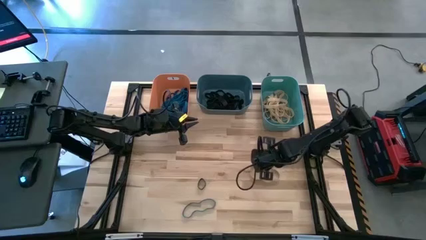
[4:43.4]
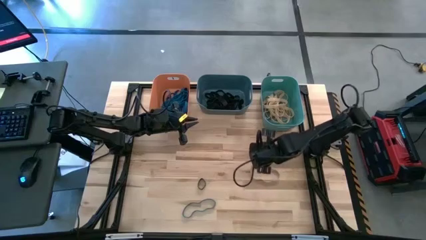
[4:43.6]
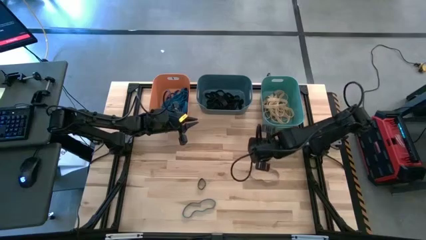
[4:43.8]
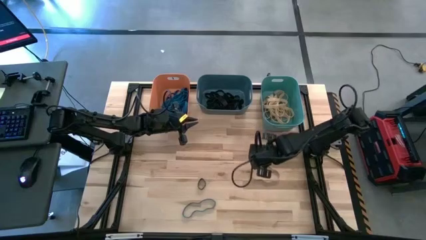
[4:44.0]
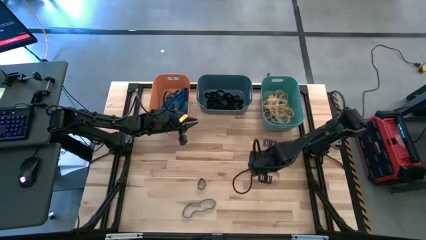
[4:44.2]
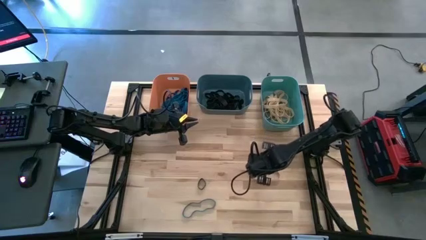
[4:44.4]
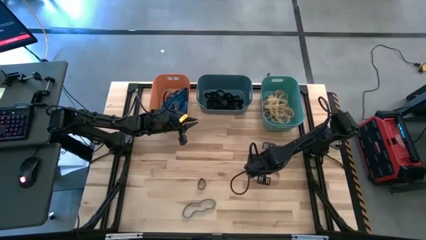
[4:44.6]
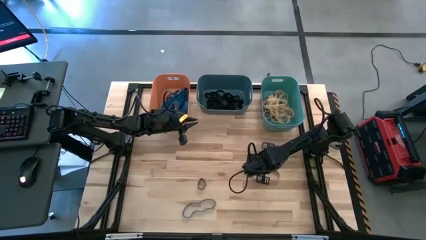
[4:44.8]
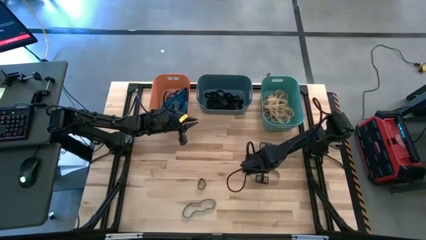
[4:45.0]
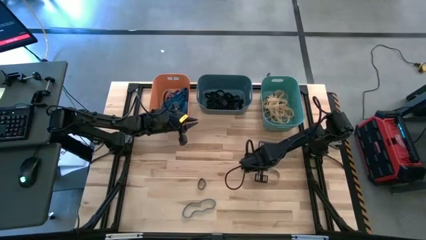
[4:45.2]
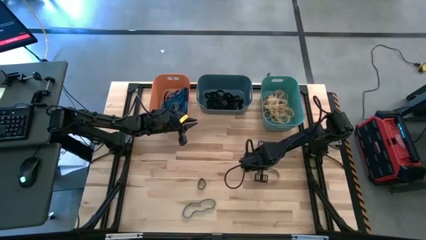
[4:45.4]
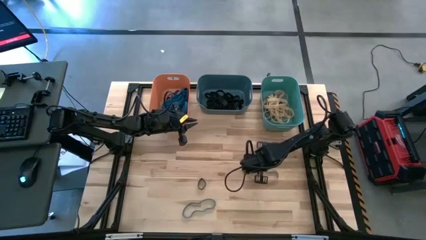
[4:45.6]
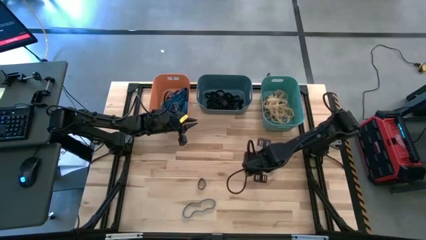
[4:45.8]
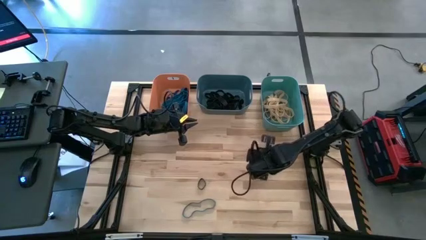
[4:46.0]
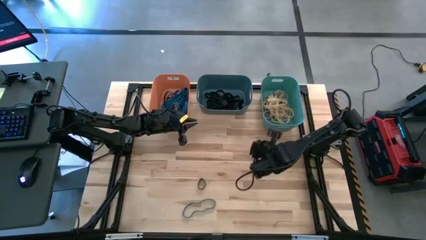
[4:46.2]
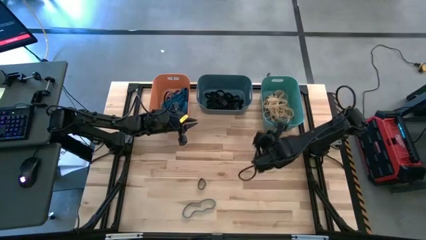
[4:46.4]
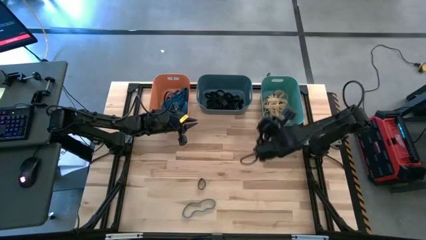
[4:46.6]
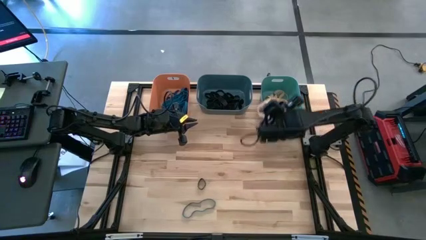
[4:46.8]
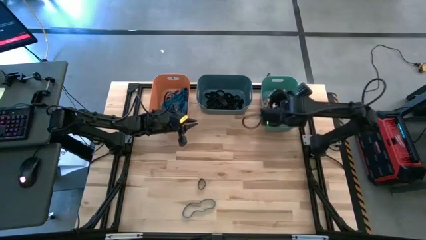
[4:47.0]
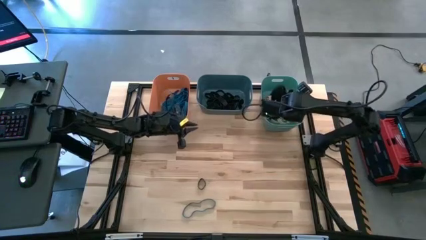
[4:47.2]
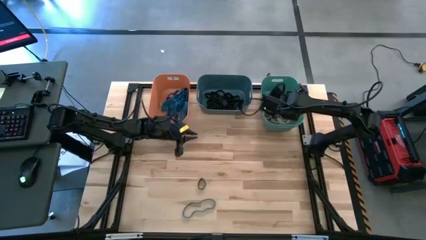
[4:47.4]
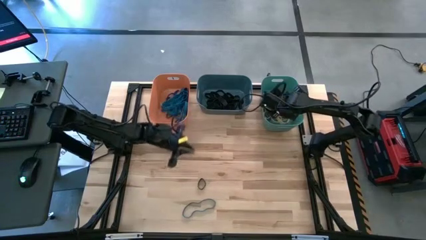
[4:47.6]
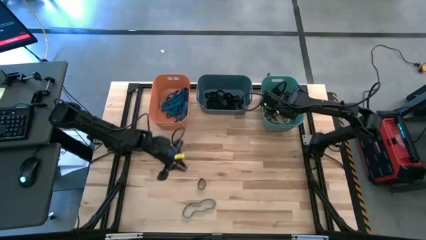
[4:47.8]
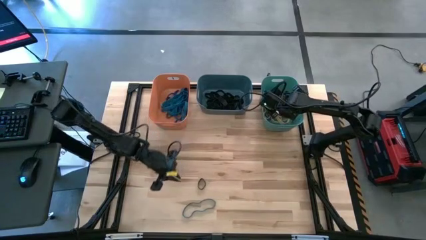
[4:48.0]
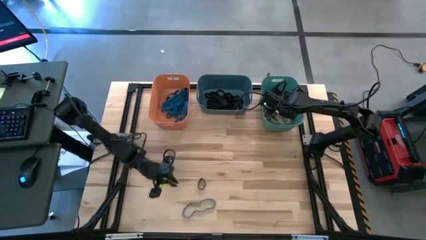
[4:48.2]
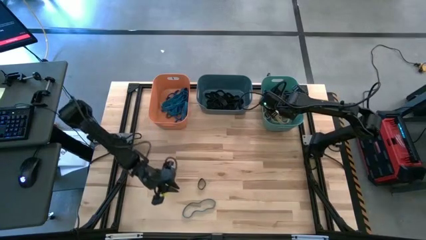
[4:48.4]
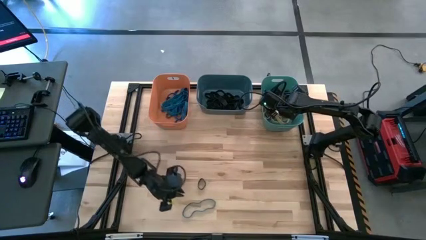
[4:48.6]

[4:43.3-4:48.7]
Task: Sort rubber bands into baskets
Put the brown rubber band into the green bin

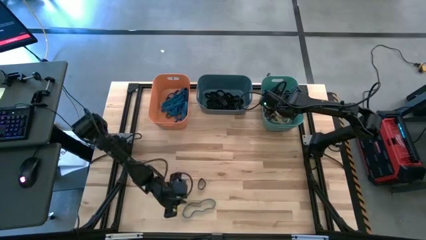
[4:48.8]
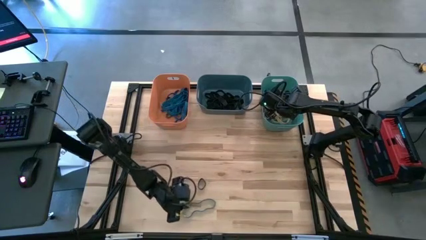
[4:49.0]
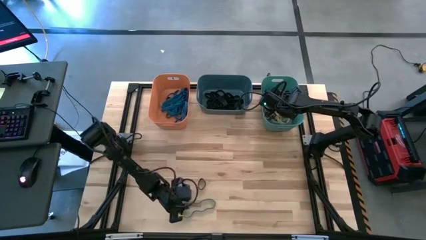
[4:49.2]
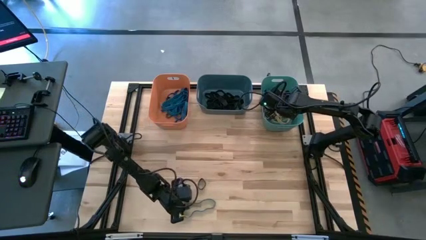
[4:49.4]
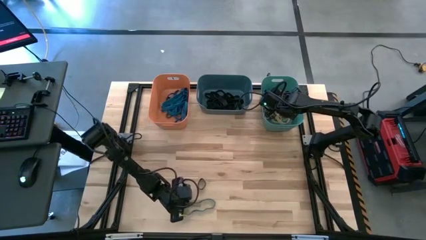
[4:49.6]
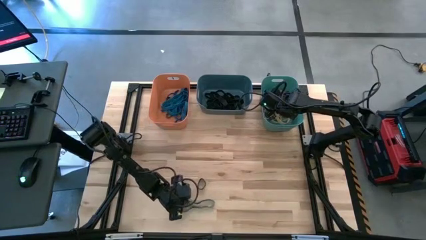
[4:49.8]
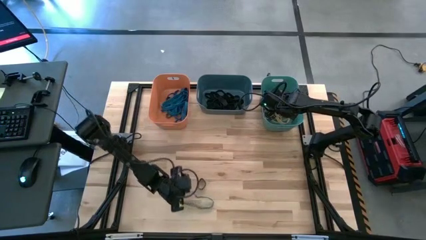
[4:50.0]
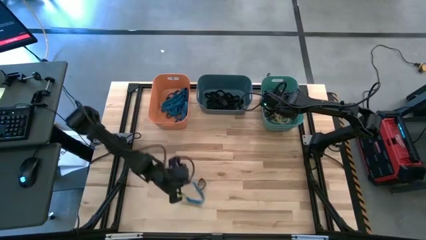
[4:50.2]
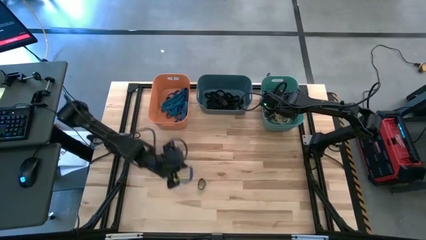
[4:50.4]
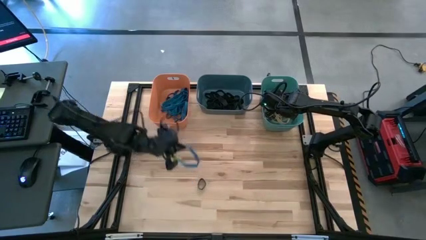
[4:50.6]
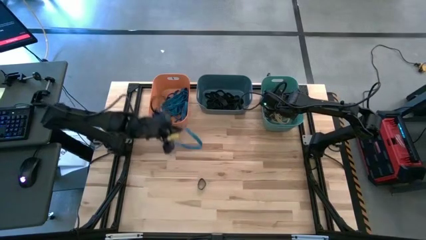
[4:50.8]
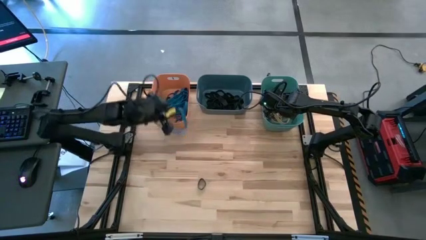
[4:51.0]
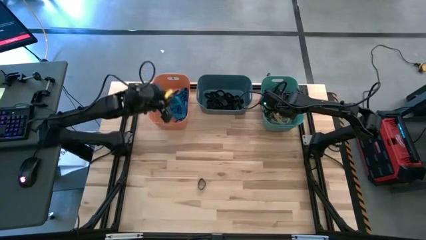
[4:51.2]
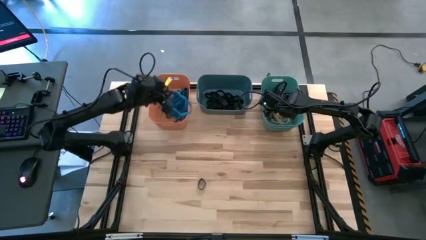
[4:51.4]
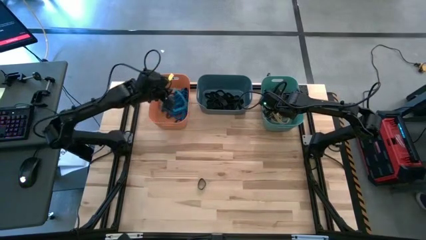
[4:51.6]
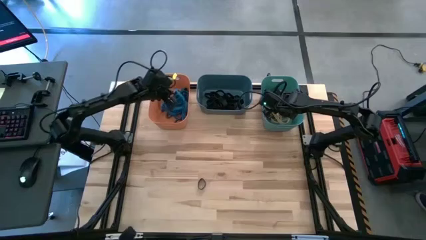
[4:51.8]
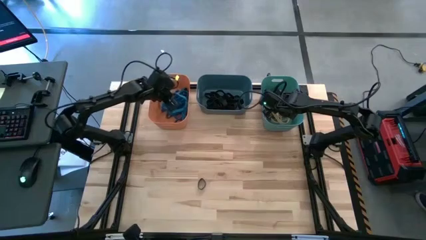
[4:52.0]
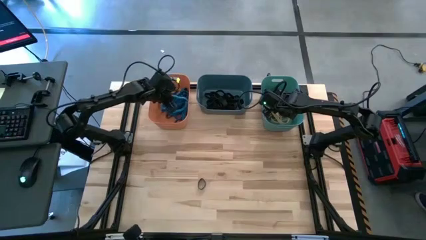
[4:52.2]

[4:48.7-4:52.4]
Put the blue rubber band into the orange bin

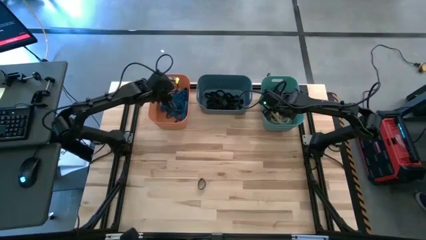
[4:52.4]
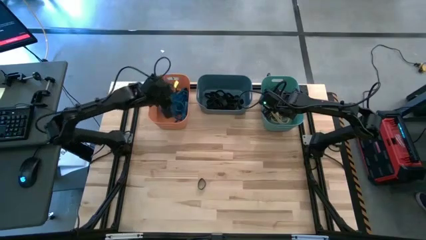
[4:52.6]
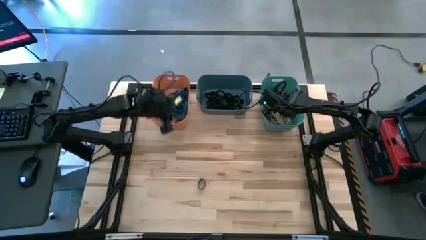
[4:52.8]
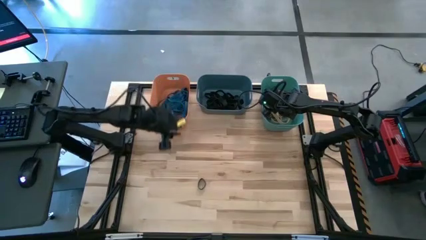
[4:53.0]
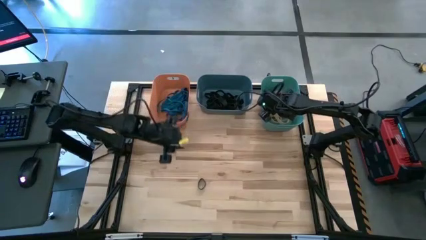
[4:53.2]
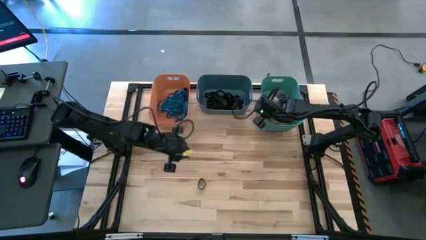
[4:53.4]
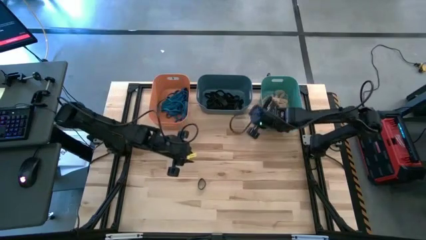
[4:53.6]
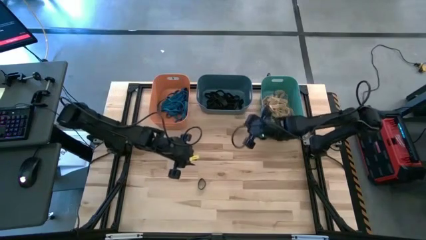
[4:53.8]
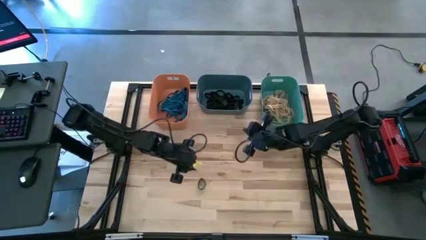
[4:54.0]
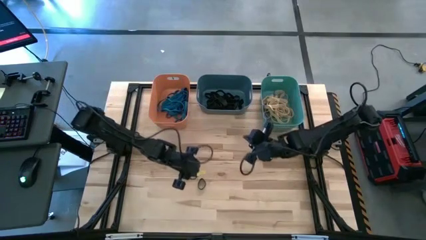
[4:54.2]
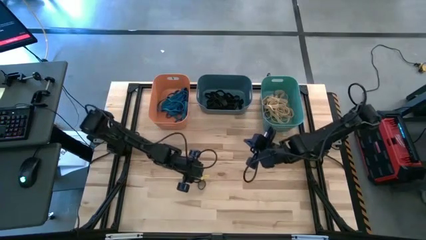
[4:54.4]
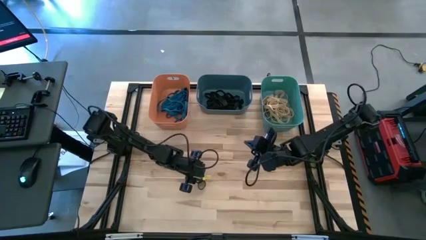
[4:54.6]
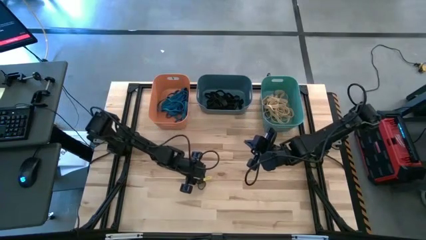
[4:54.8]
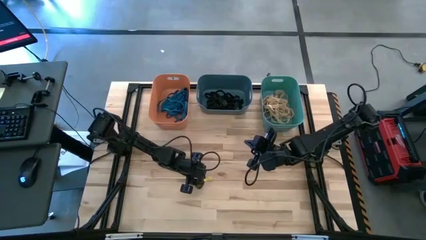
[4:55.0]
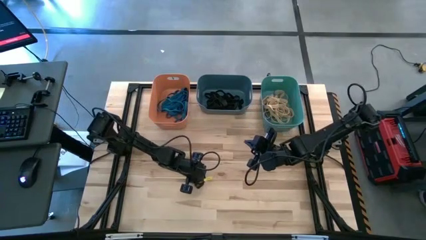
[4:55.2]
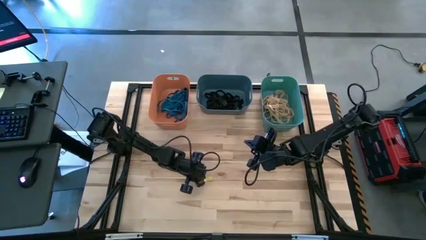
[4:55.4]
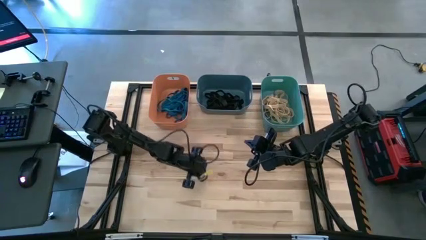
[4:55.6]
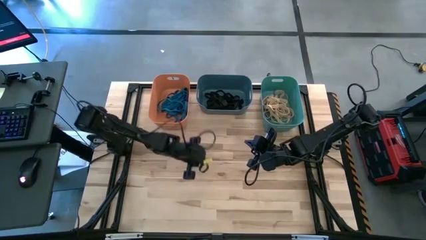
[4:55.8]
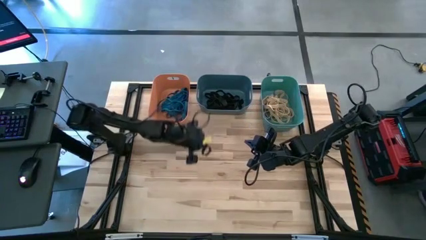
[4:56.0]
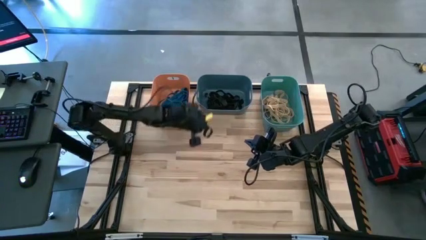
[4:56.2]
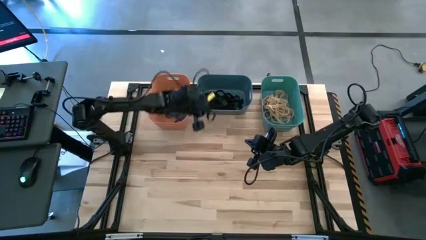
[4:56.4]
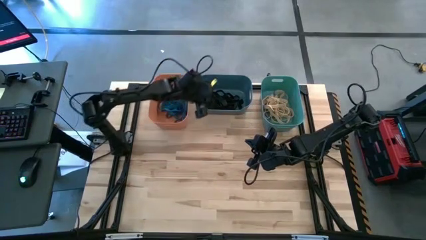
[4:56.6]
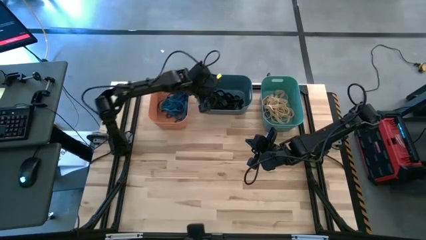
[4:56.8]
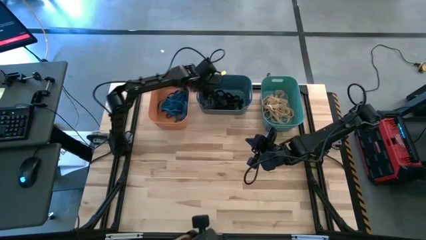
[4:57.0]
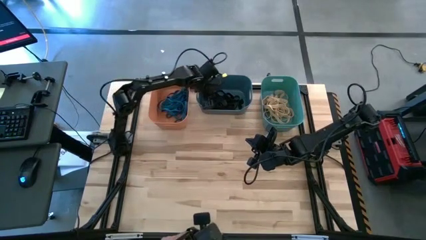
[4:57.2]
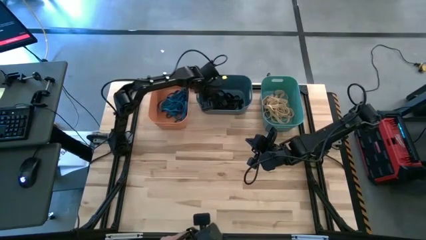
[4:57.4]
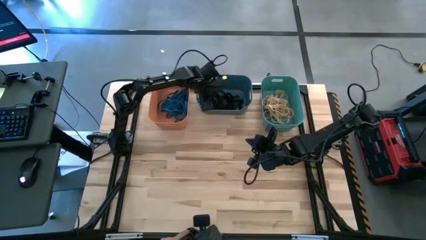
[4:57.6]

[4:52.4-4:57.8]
Put the black rubber band into the blue bin

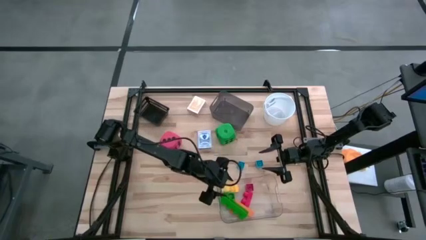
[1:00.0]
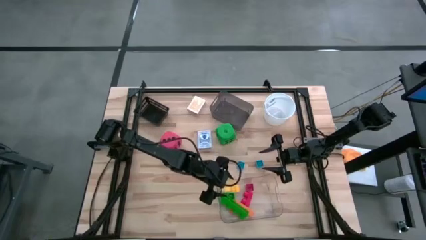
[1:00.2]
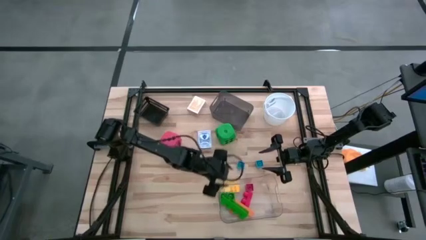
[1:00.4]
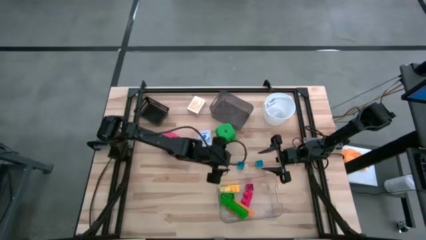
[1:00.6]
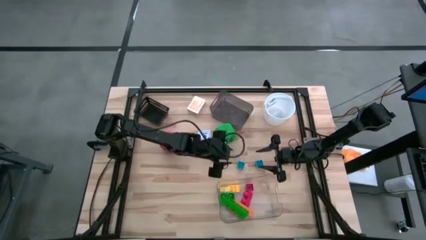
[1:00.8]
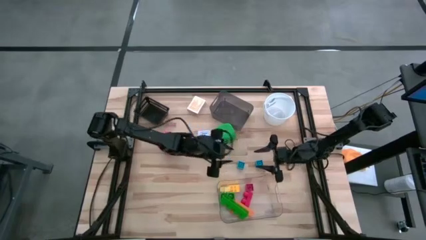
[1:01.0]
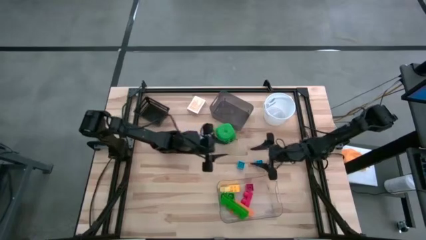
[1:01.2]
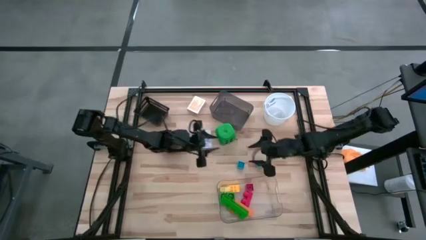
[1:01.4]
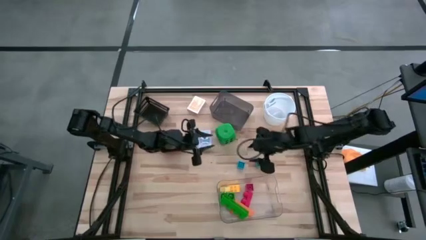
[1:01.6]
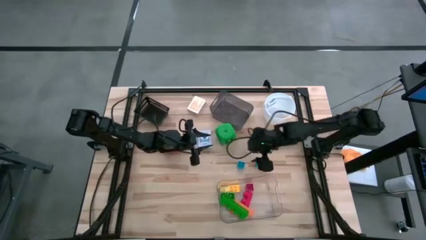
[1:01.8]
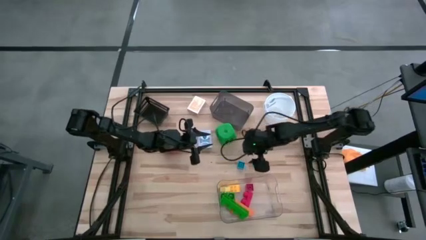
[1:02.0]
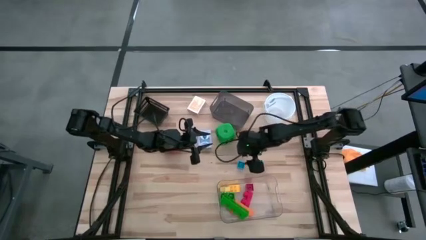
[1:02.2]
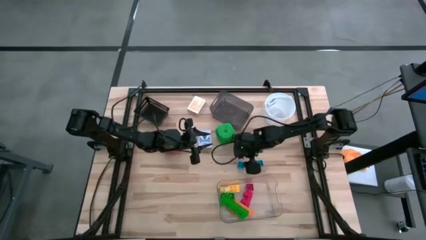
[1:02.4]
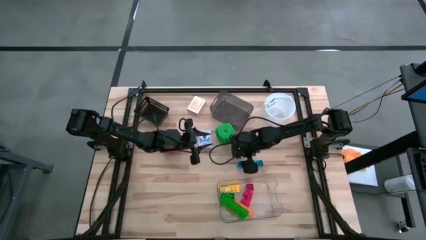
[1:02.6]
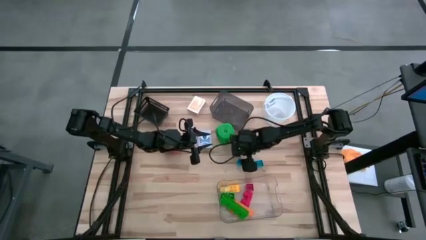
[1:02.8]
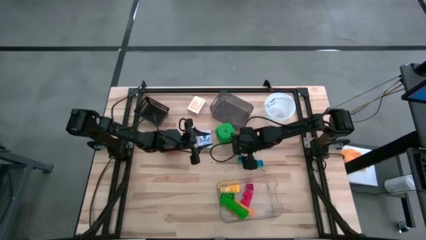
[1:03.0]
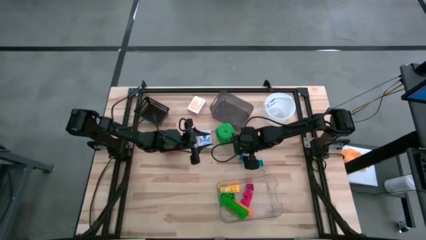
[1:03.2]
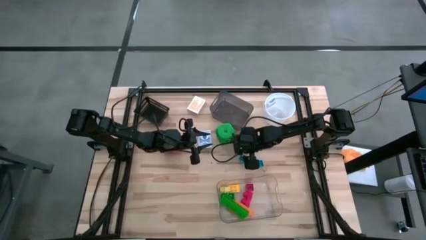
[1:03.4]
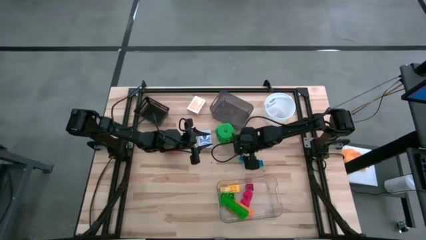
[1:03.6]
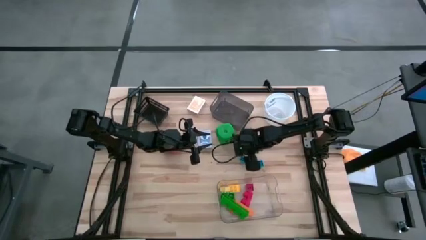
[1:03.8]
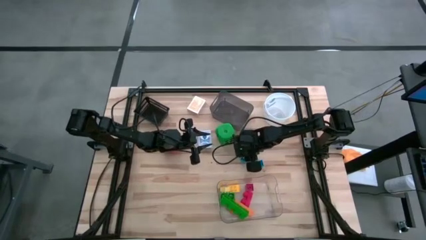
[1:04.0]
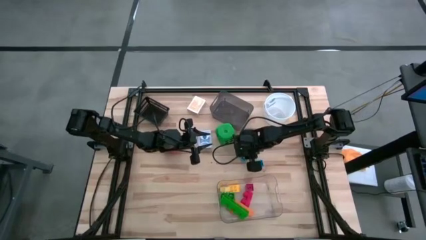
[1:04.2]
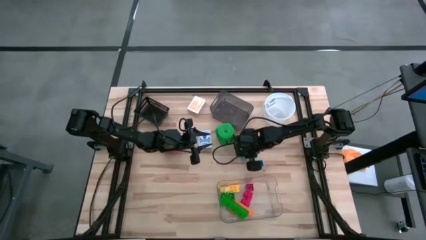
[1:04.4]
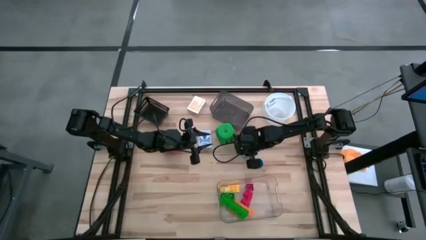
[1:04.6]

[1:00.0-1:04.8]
Task: Pick & Place Toys
Put the blue game piece into the bottom transparent bin
